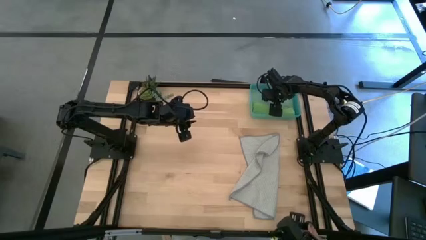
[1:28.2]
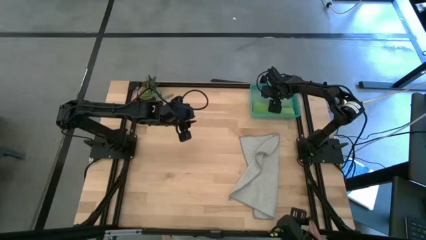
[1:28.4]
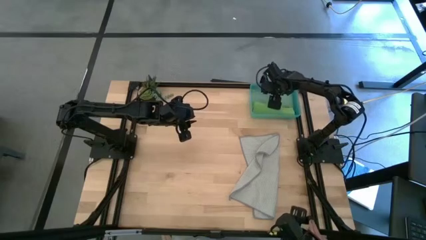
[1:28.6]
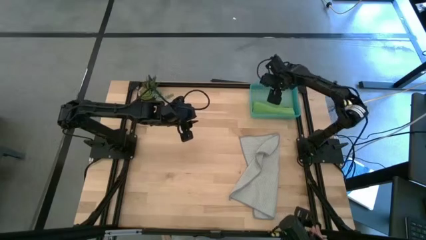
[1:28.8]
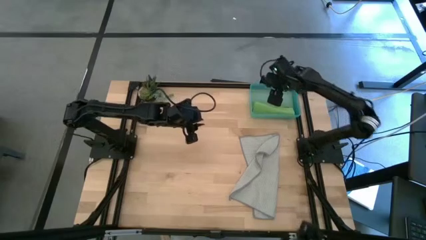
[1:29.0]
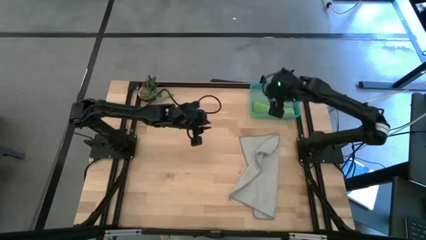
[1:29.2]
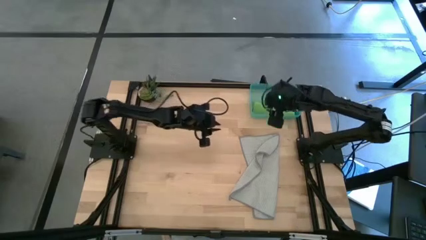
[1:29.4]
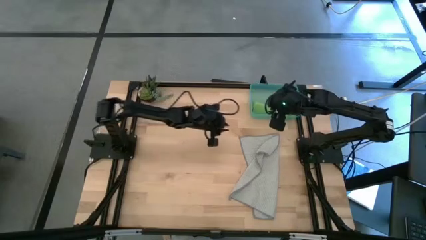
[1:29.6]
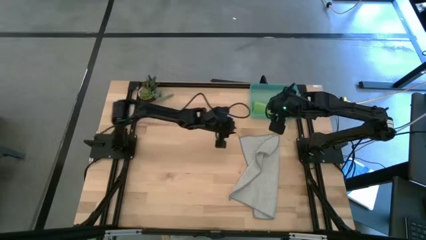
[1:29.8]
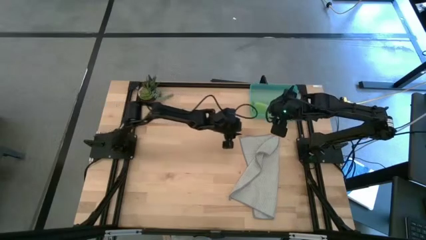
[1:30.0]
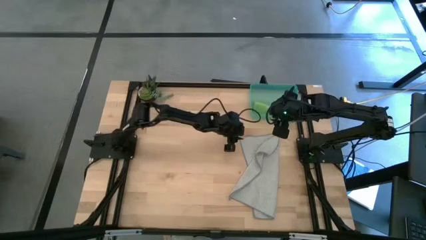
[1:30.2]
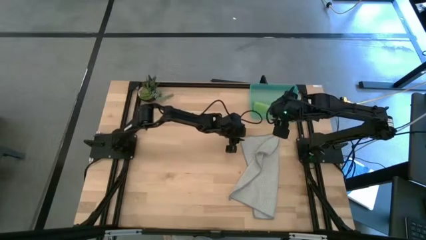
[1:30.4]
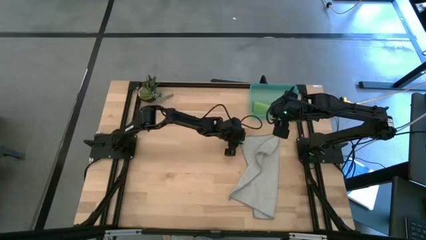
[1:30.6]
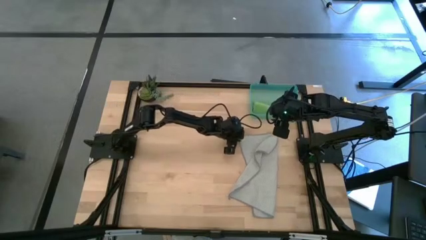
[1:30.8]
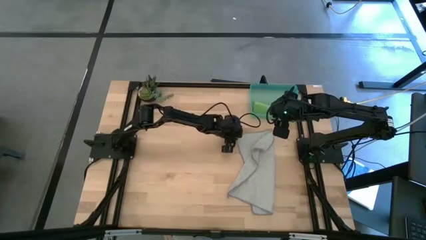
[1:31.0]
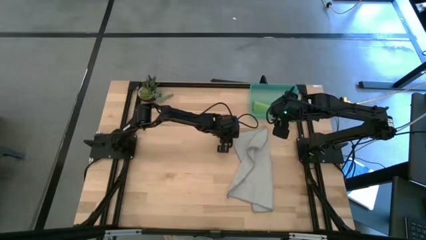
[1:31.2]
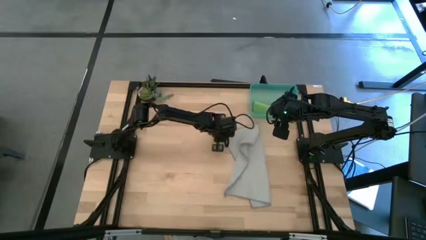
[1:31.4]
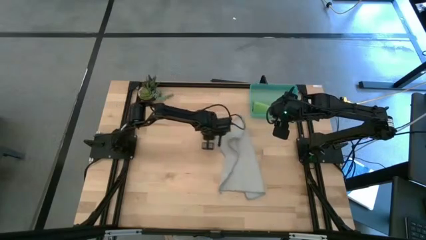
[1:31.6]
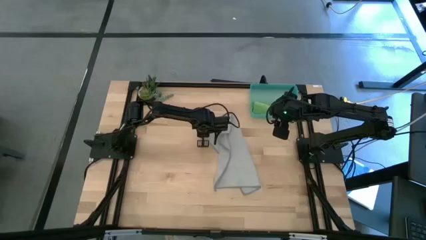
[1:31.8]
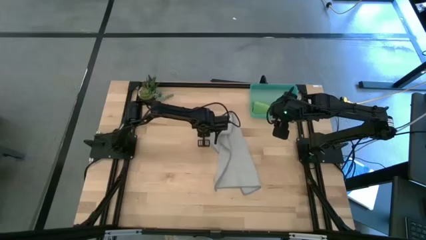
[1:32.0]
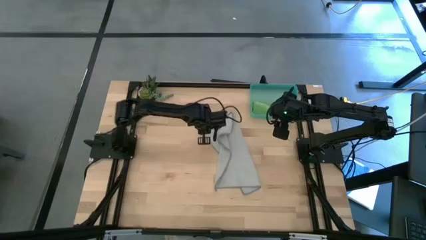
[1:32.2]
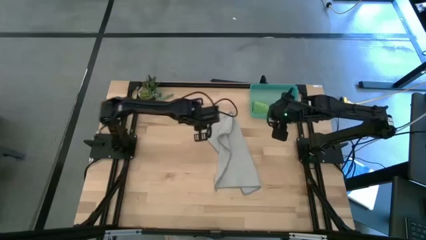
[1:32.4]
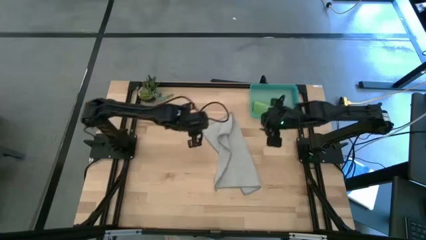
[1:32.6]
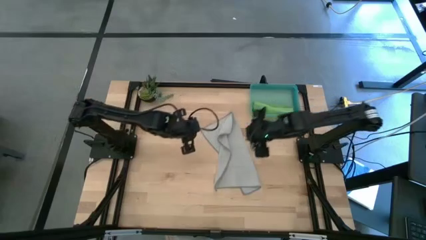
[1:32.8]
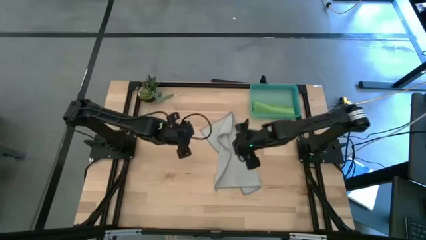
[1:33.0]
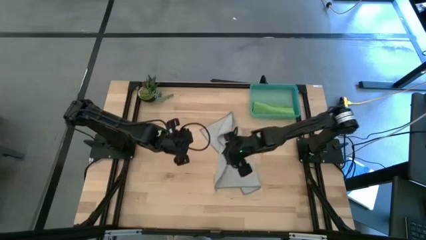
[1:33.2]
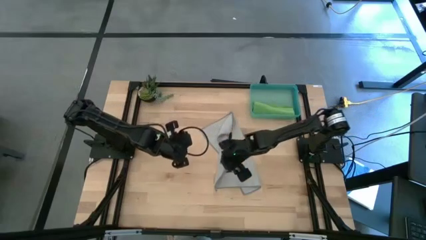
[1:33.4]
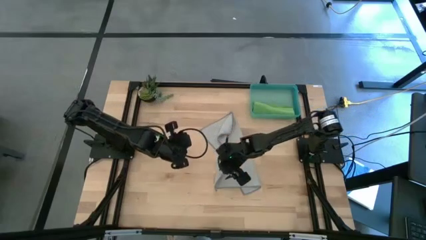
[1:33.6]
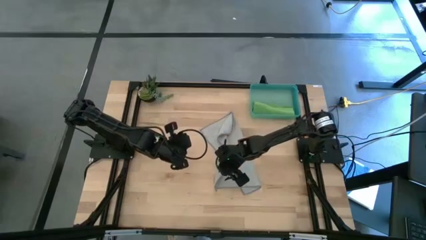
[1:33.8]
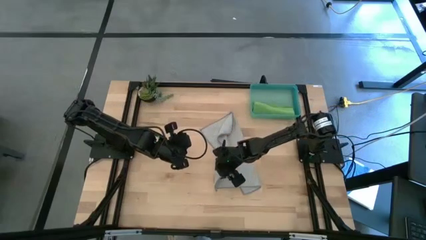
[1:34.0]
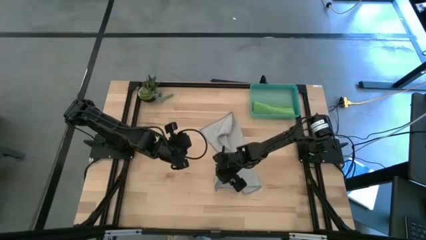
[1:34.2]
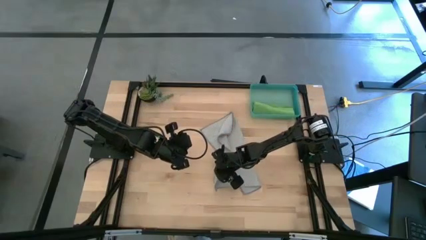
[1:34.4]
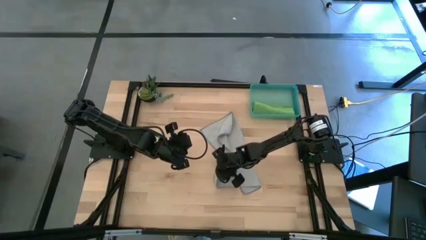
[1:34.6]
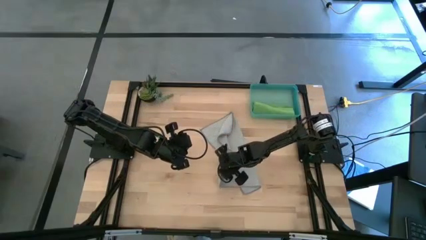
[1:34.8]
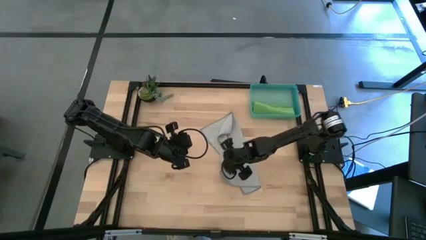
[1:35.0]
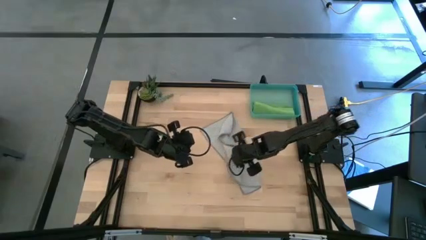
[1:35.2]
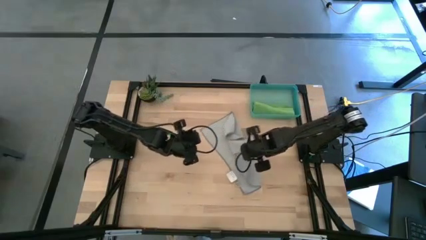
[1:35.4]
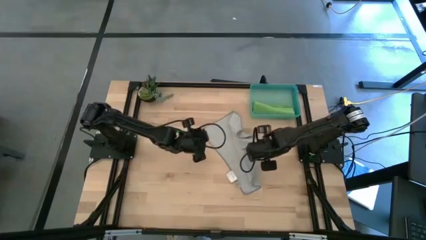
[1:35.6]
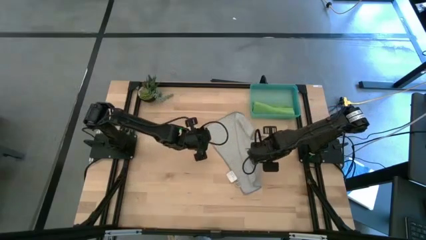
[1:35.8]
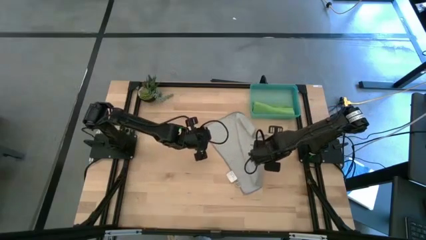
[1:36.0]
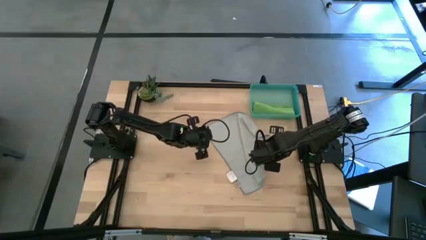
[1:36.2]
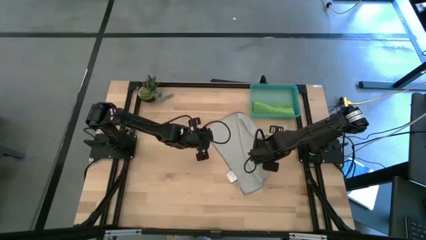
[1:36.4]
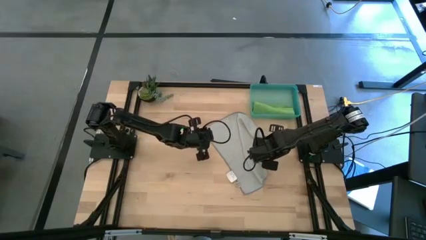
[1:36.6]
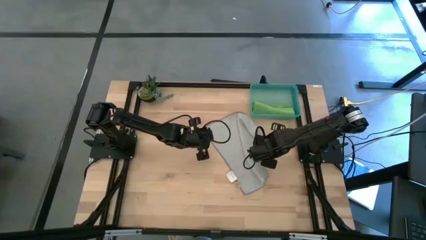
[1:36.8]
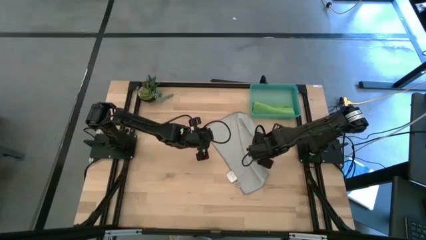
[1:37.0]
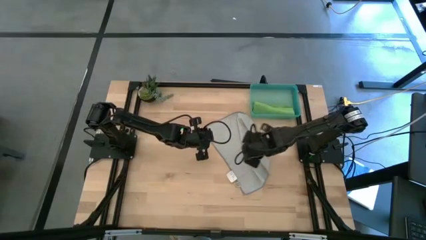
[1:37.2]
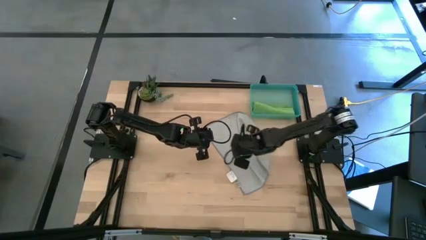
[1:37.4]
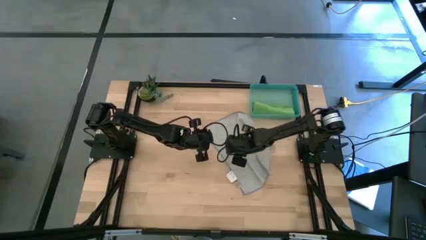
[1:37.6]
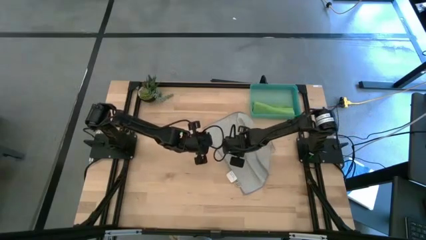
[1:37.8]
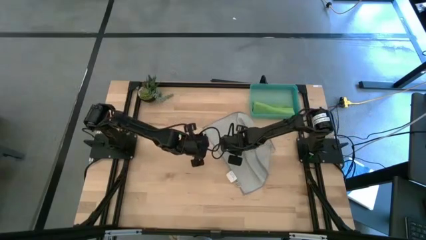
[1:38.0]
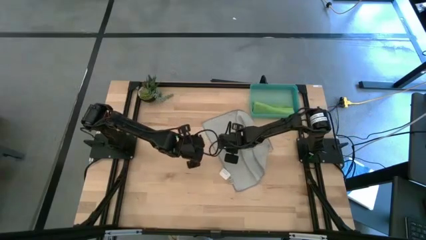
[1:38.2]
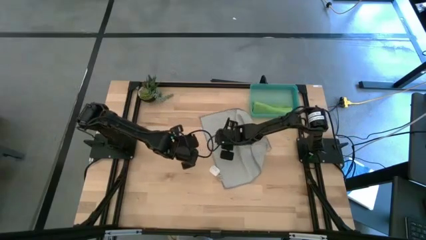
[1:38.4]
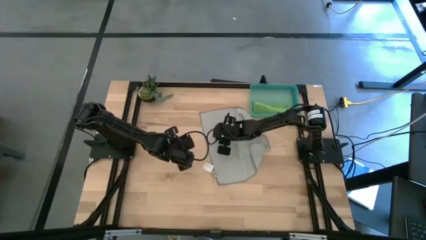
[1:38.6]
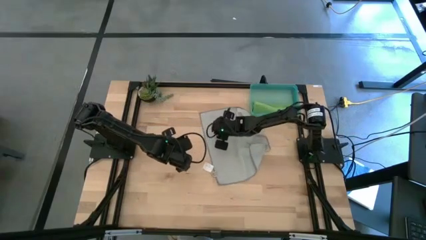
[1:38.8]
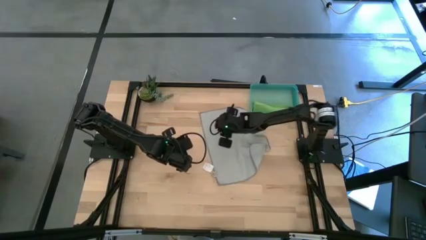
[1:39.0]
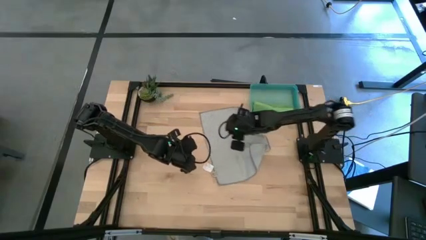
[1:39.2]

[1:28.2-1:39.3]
Task: Roll microfiber towels into tight, uniform cylinder then place into a basket
Fold the gray microfiber cloth
